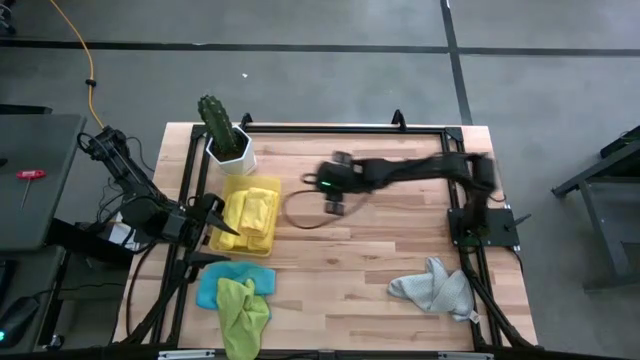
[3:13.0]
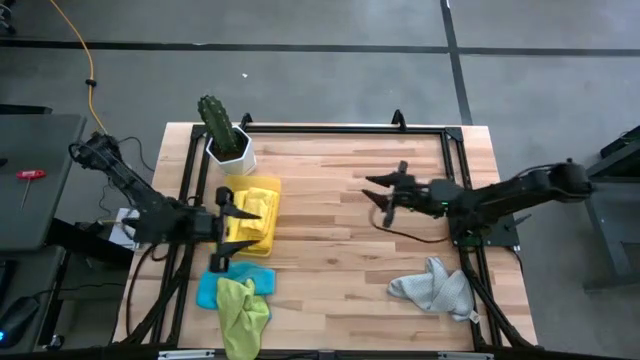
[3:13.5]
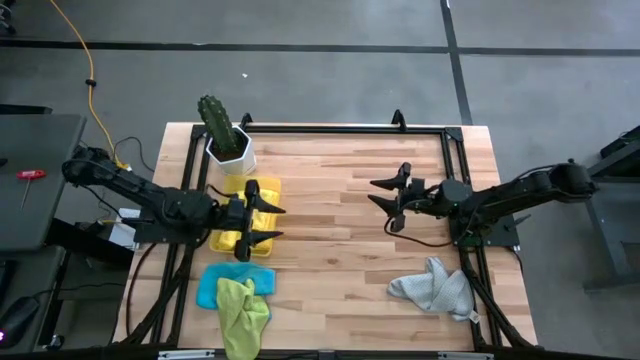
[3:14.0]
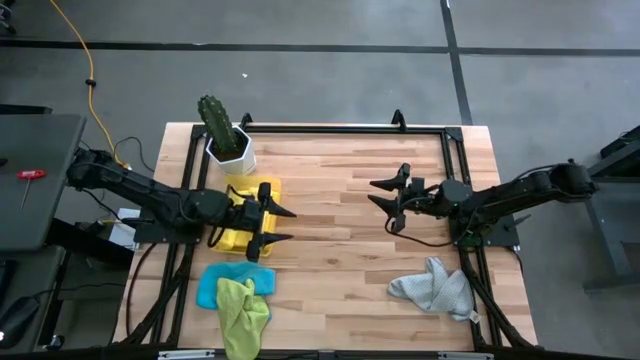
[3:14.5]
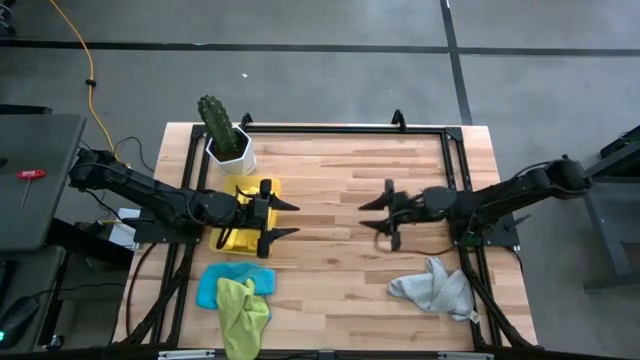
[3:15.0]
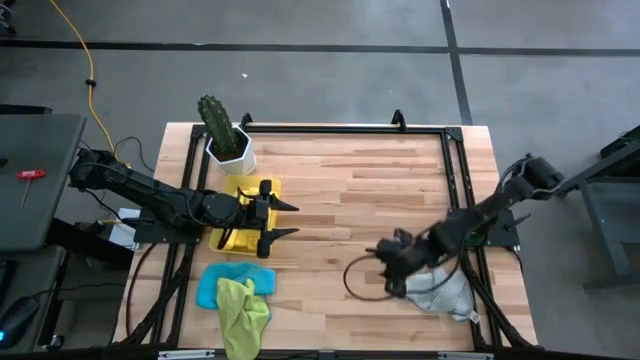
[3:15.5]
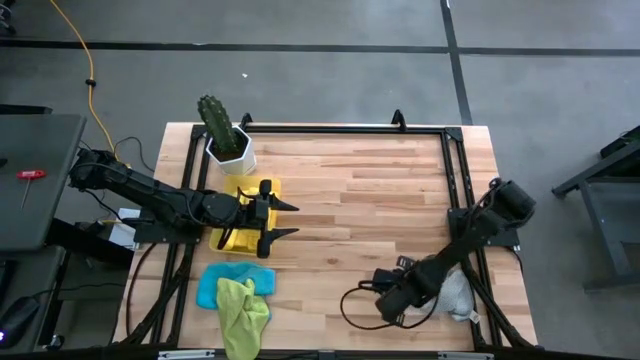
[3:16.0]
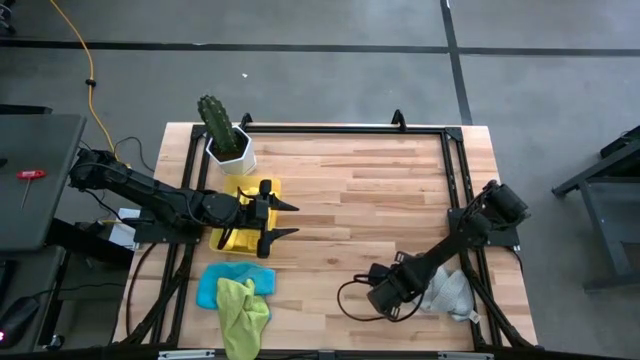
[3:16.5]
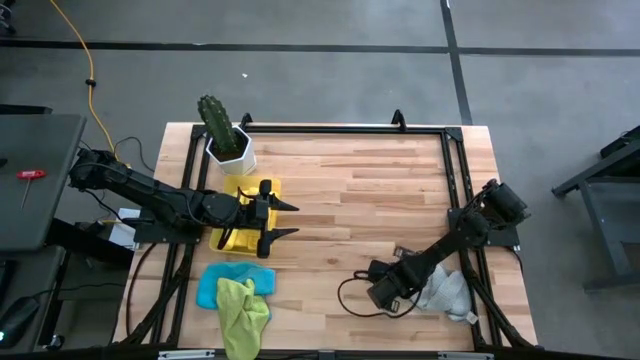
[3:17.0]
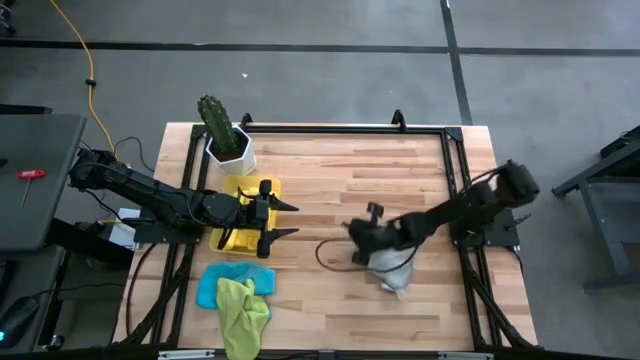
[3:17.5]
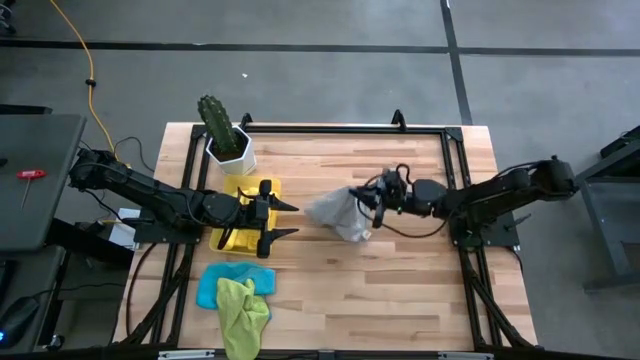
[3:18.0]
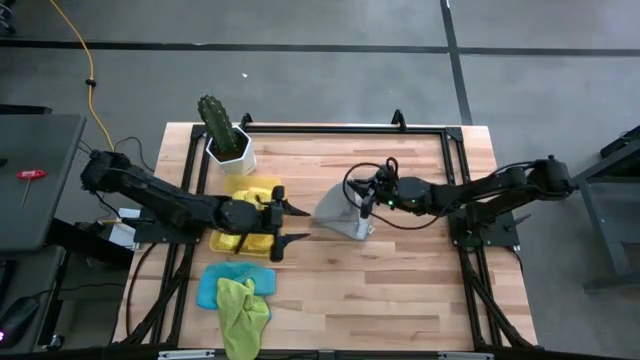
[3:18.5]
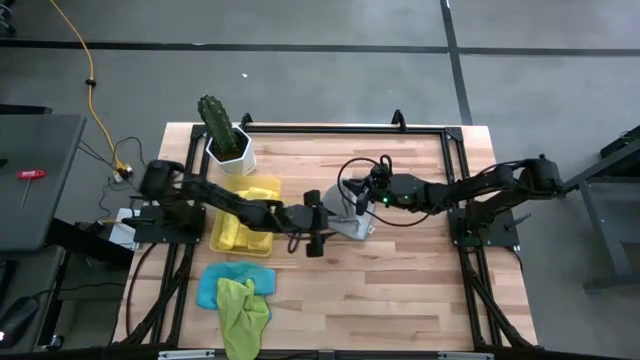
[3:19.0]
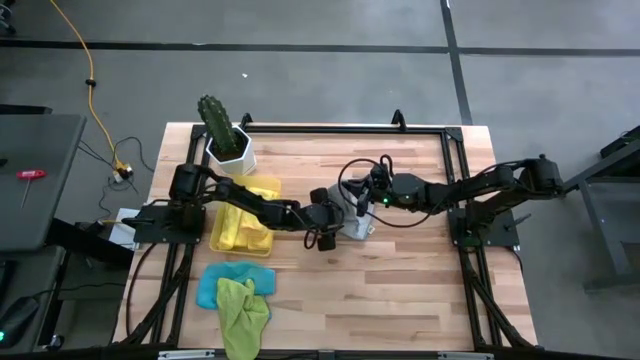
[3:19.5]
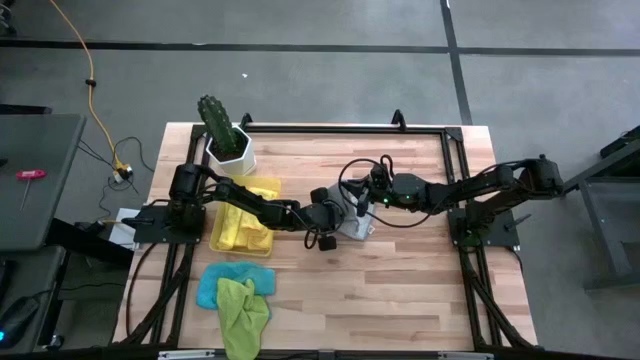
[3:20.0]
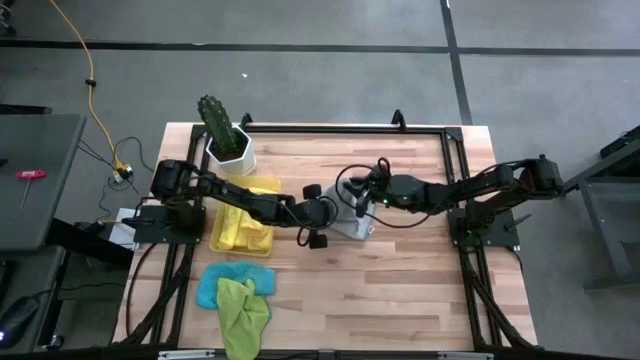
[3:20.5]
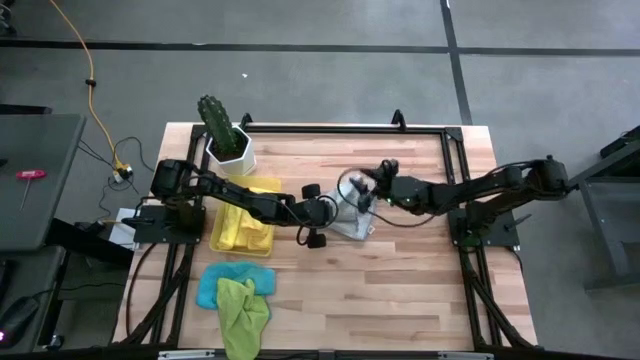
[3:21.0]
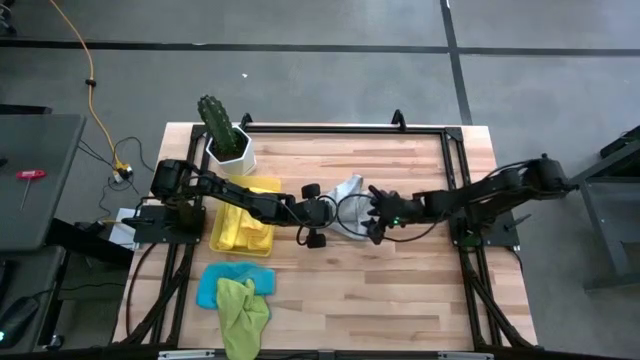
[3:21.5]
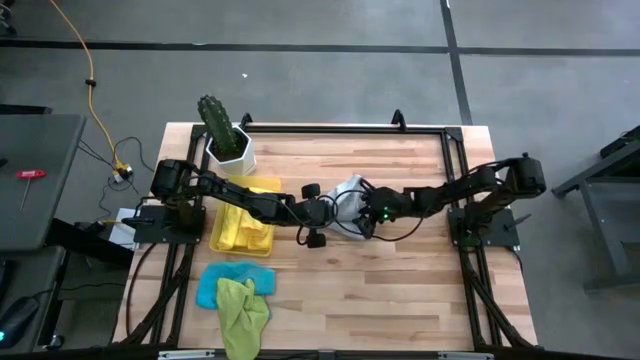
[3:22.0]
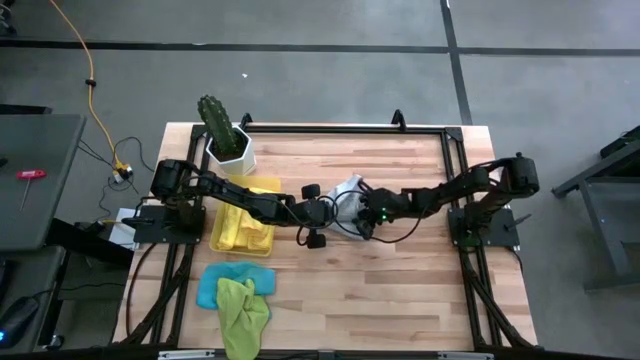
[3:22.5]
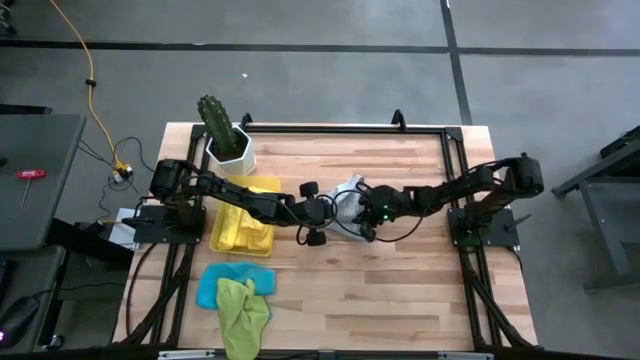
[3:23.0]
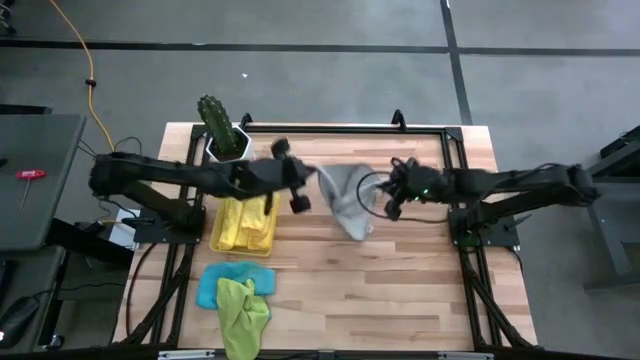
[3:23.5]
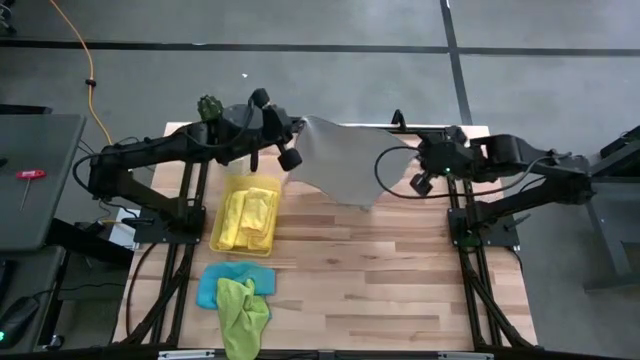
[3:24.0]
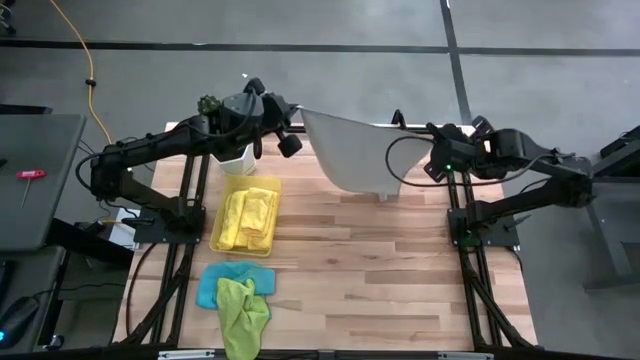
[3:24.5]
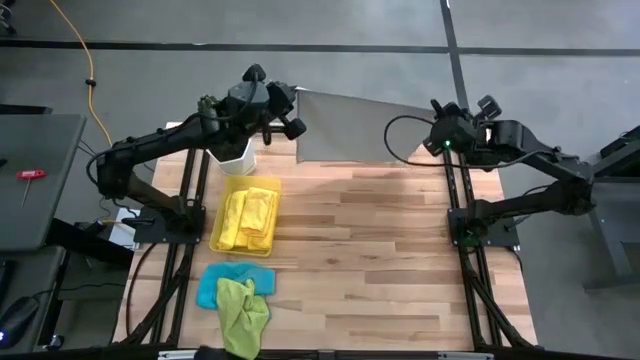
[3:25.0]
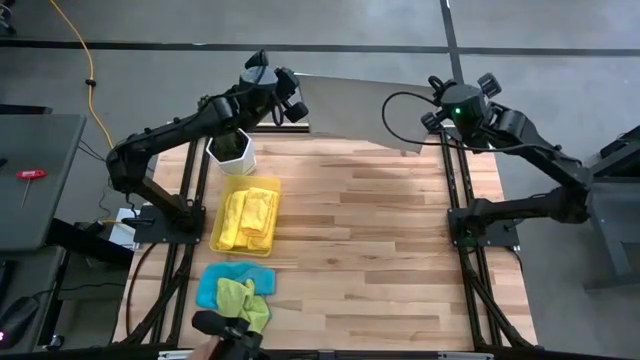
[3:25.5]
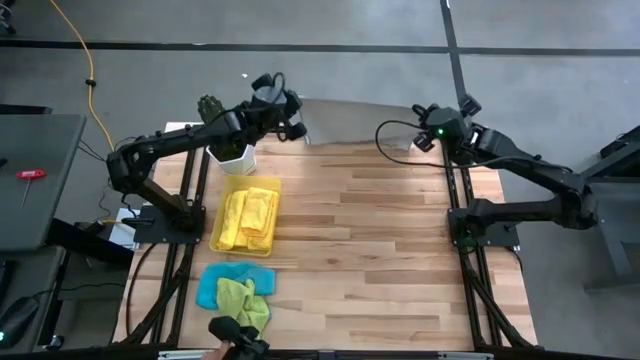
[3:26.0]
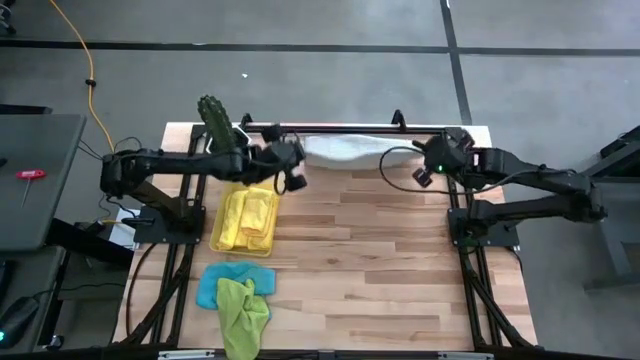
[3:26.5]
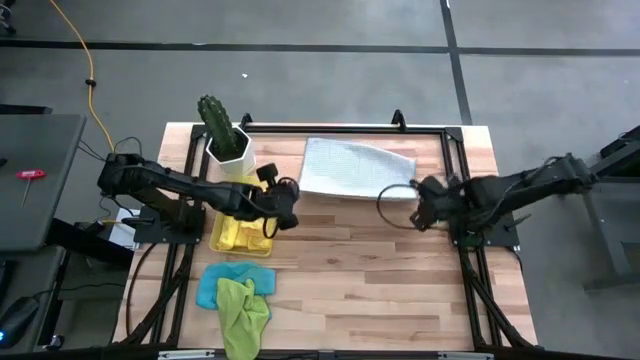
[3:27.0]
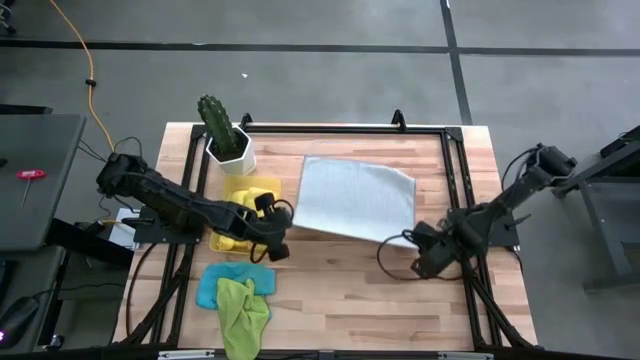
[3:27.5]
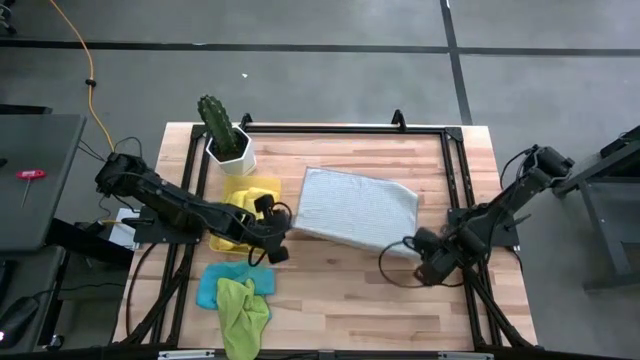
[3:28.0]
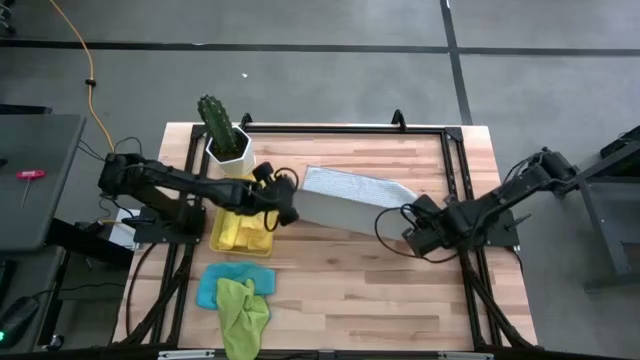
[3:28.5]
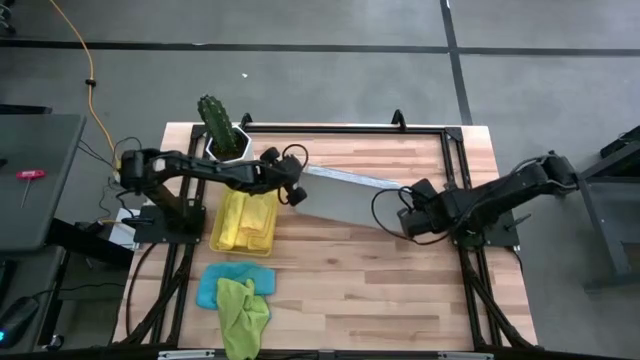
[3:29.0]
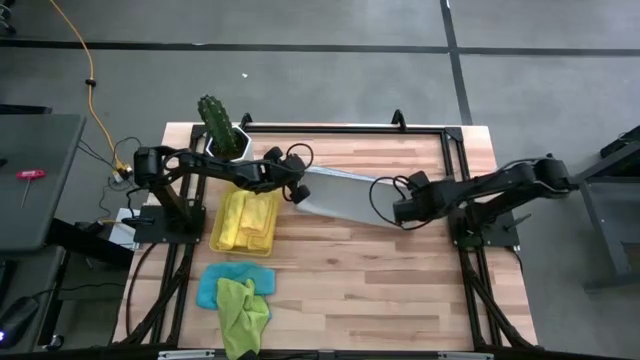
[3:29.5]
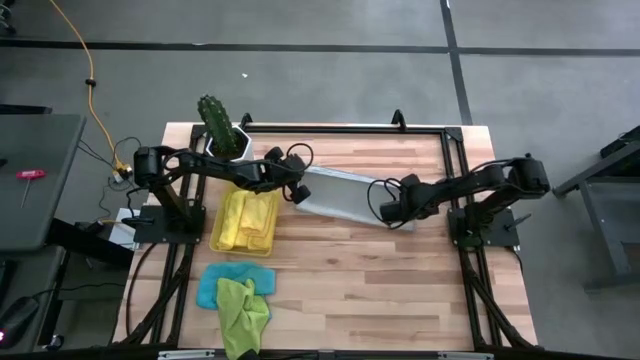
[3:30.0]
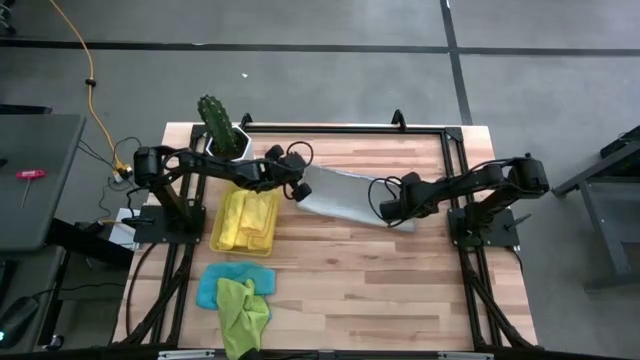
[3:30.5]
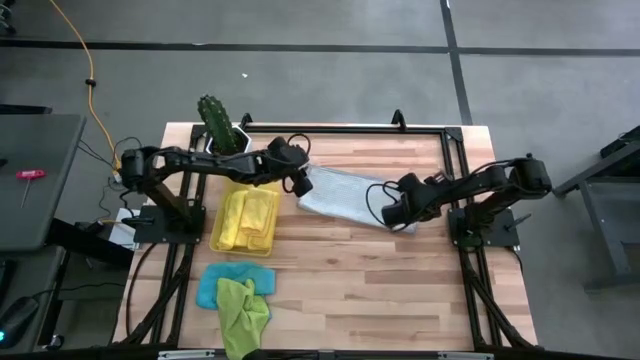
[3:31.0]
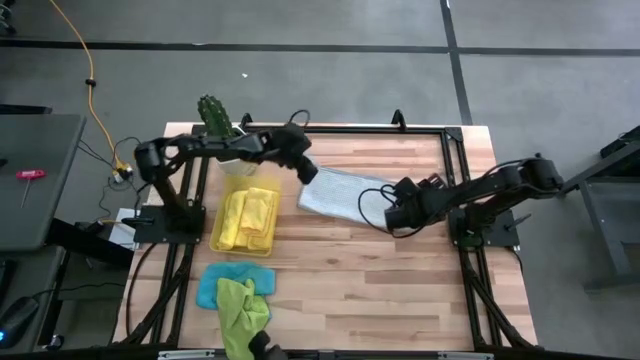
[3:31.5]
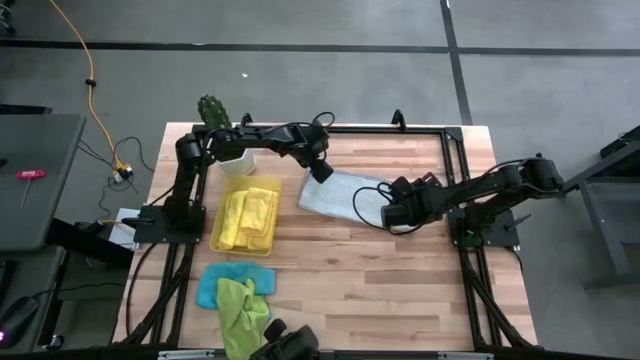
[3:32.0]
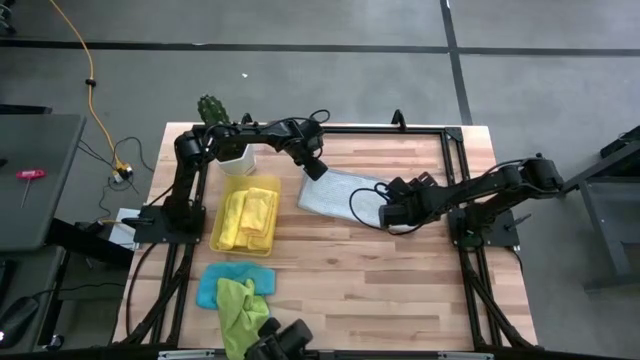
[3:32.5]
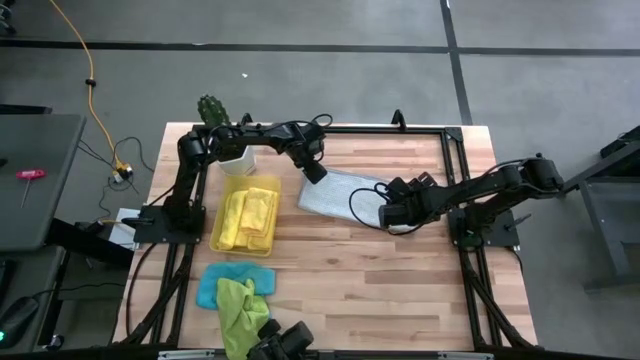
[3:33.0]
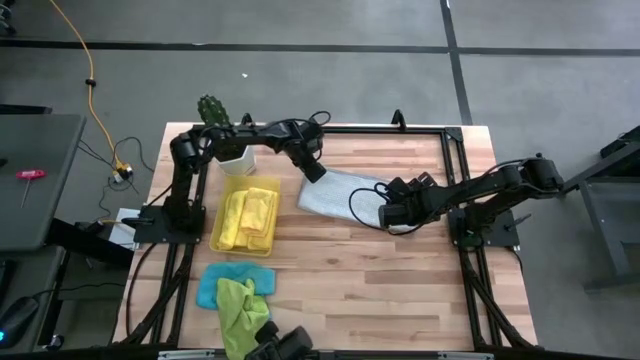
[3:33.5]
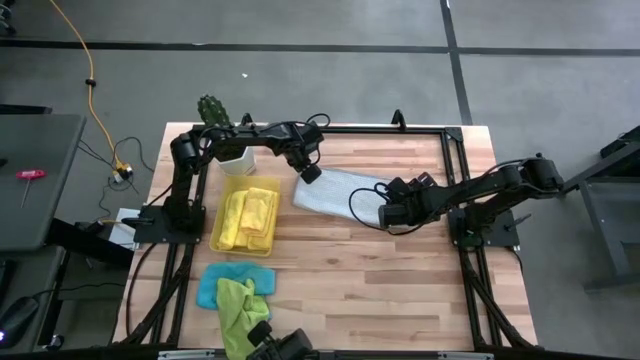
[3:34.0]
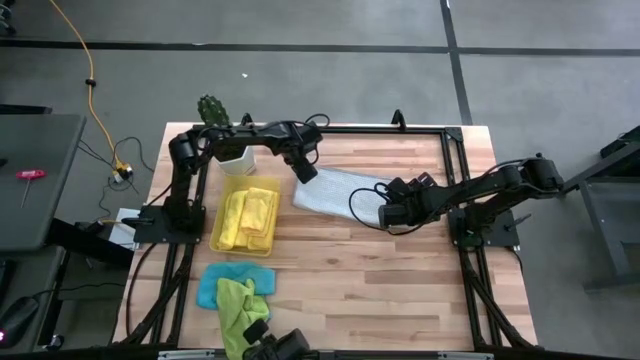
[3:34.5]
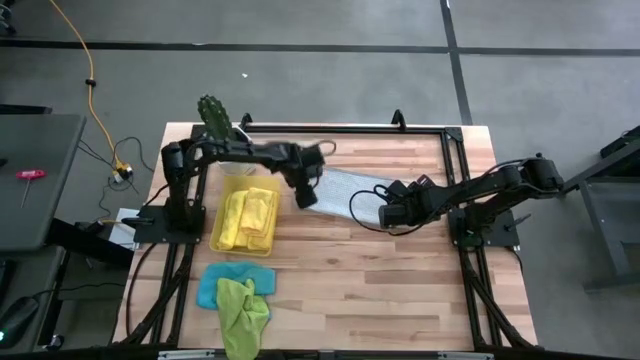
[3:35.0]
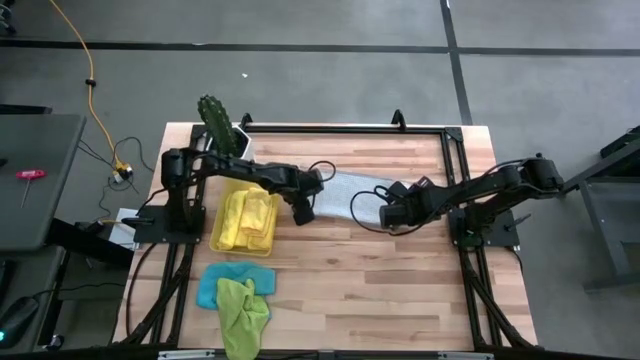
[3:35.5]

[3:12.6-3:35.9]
Task: Fold microfiber towels
Fold the gray microfiber towel
